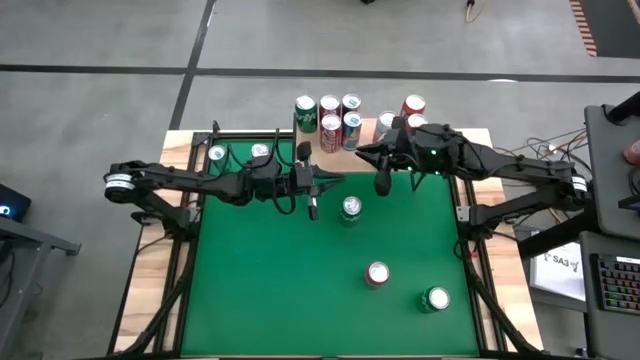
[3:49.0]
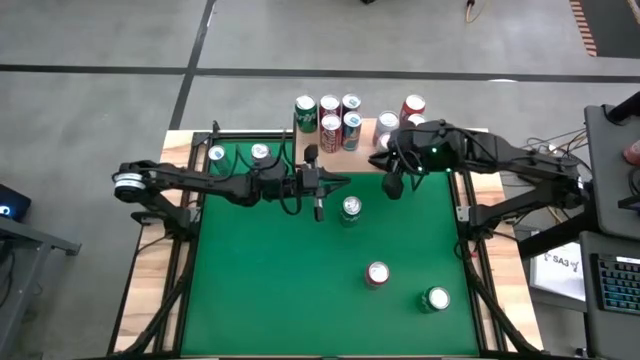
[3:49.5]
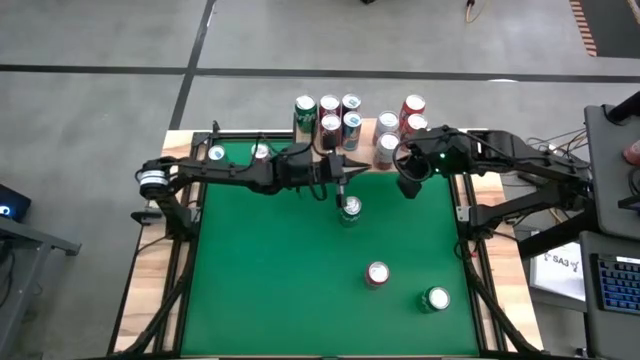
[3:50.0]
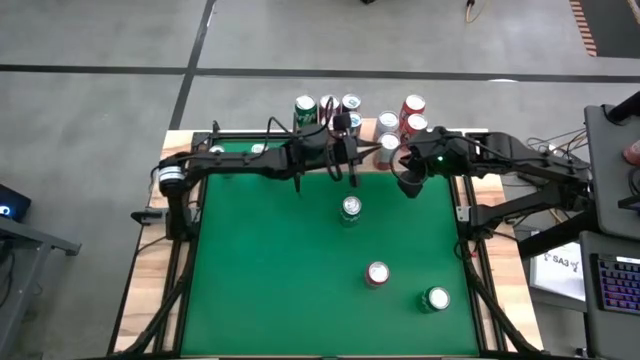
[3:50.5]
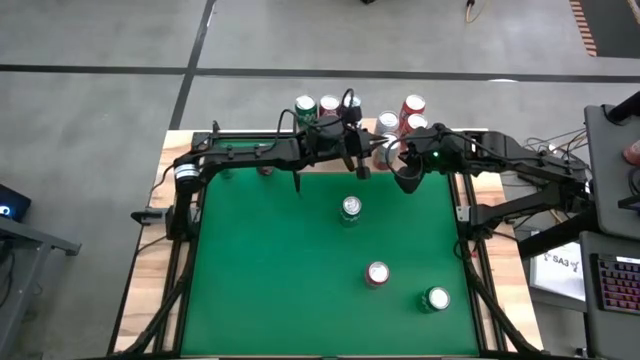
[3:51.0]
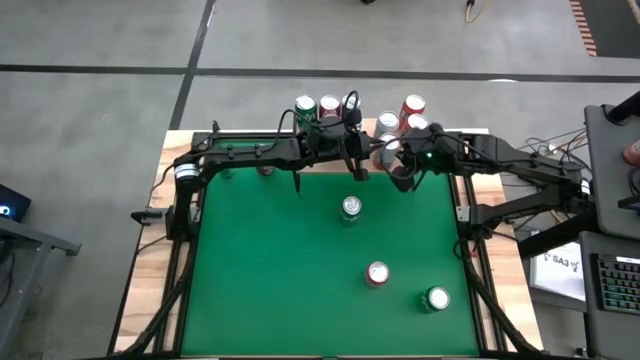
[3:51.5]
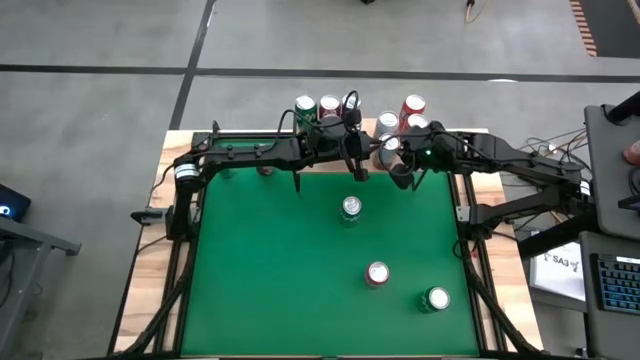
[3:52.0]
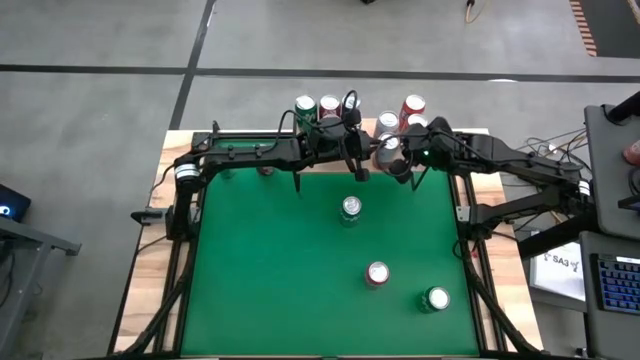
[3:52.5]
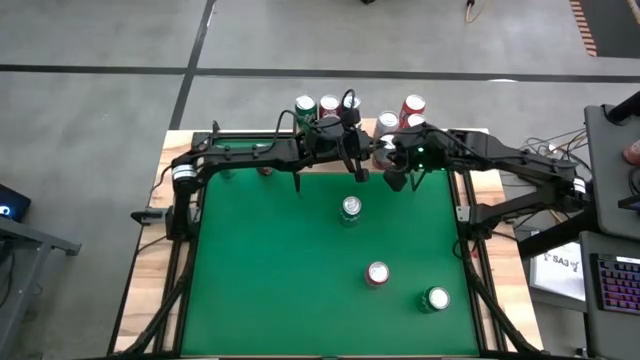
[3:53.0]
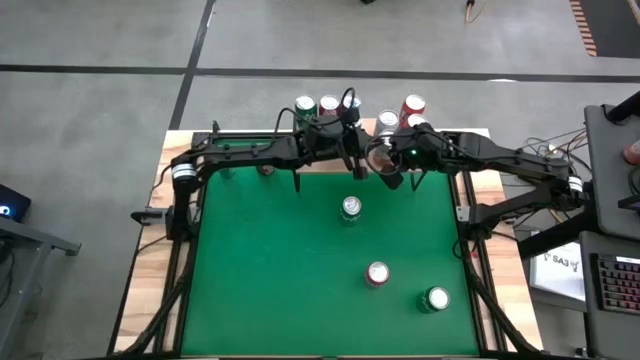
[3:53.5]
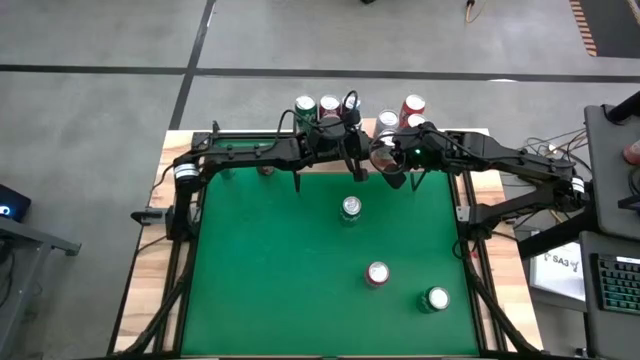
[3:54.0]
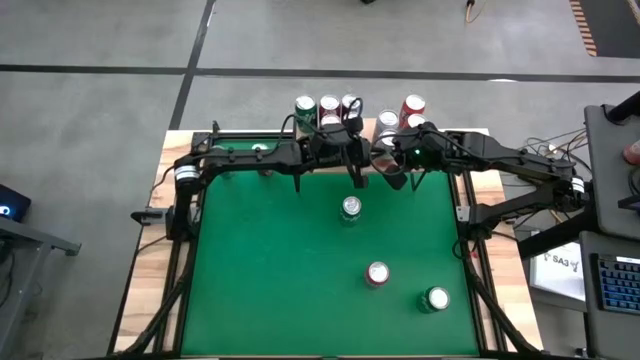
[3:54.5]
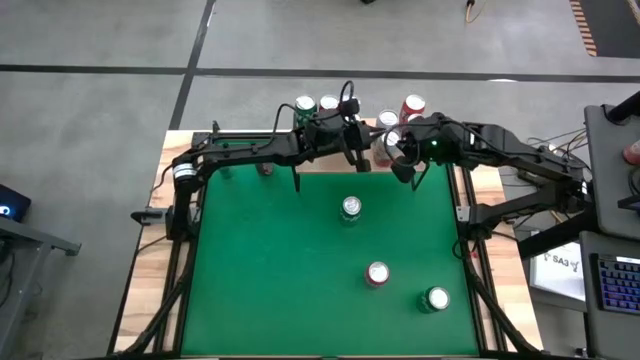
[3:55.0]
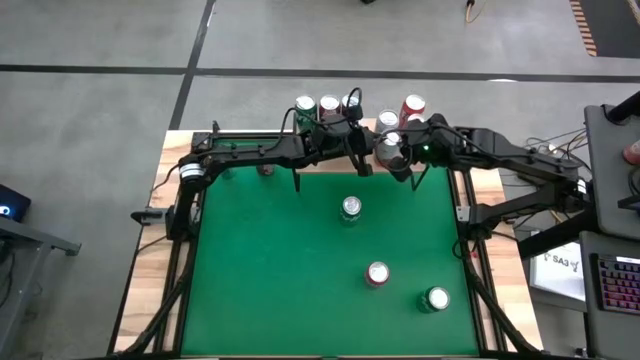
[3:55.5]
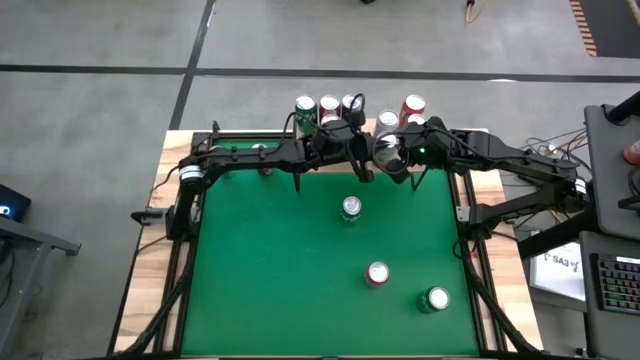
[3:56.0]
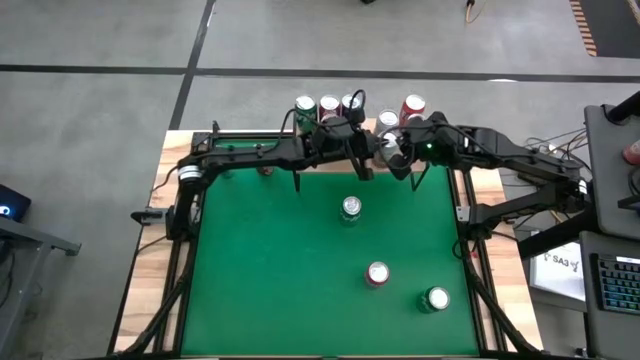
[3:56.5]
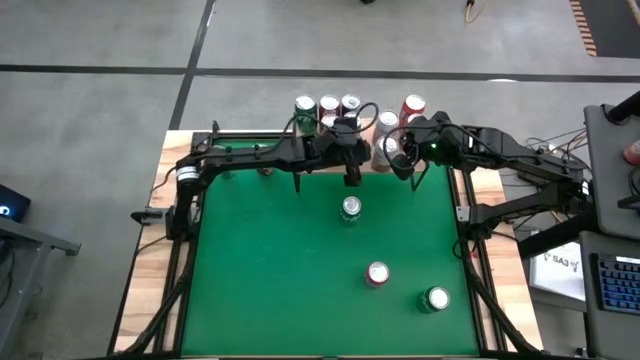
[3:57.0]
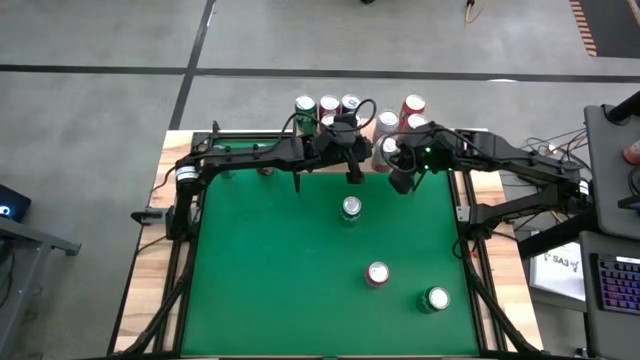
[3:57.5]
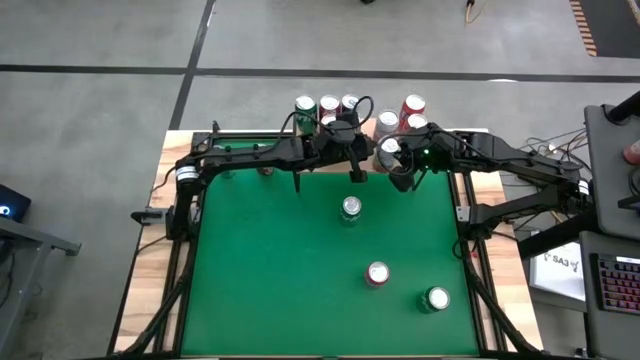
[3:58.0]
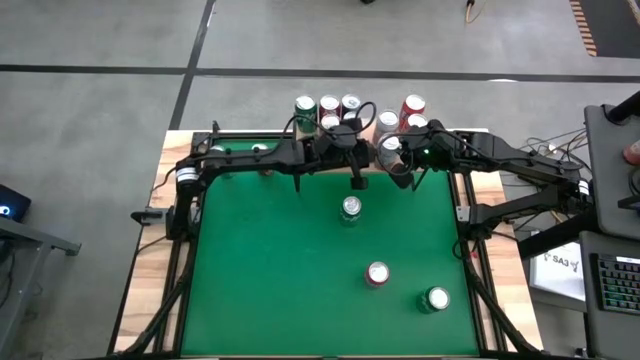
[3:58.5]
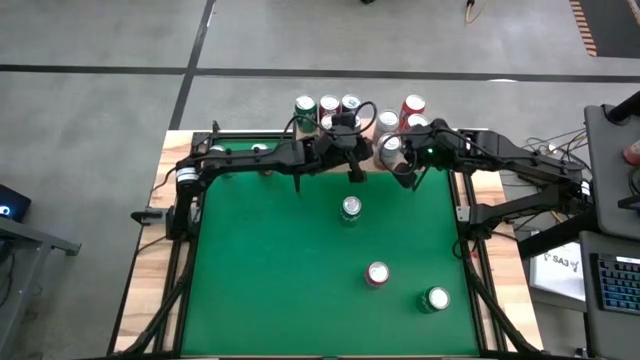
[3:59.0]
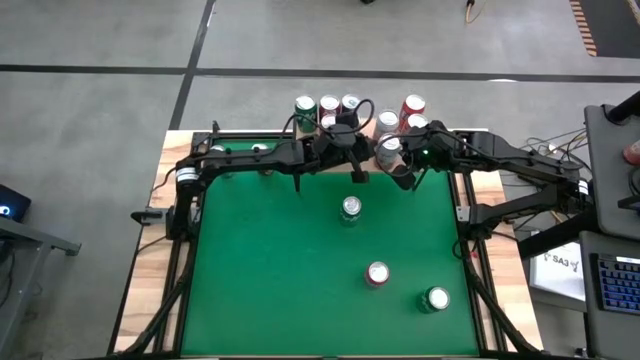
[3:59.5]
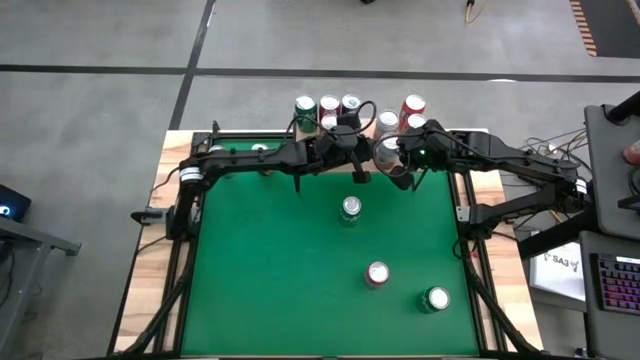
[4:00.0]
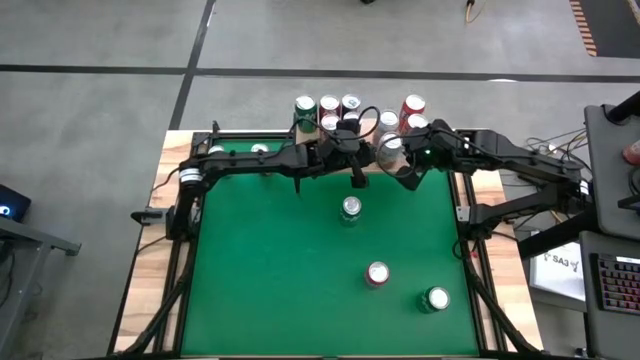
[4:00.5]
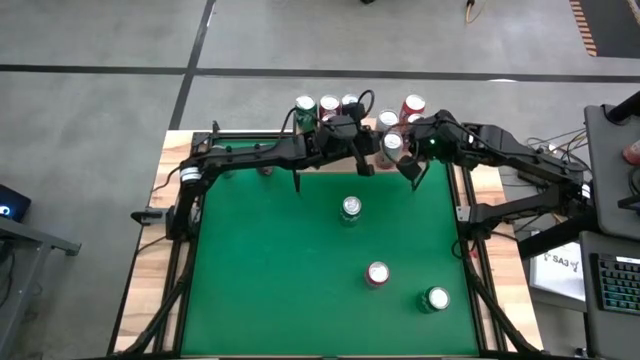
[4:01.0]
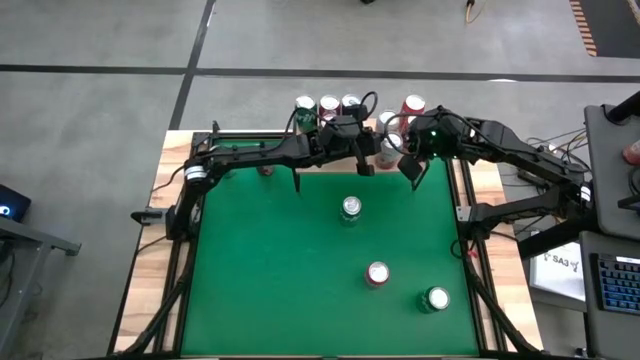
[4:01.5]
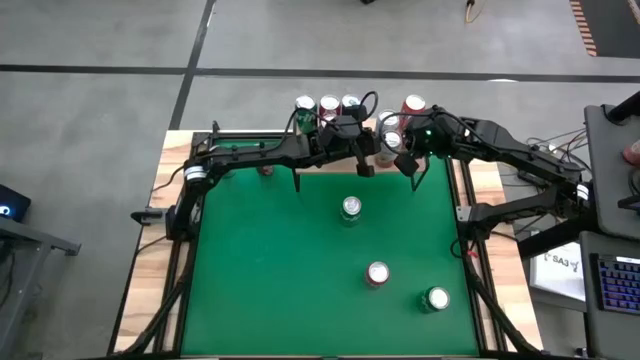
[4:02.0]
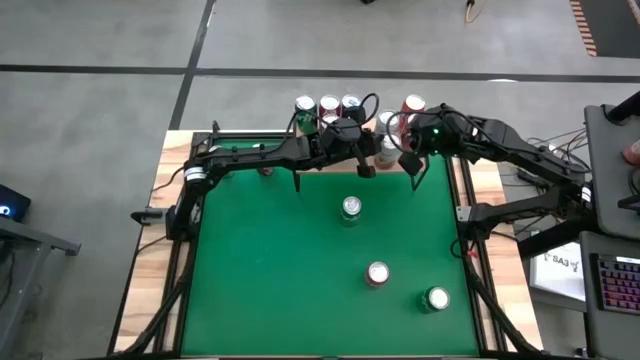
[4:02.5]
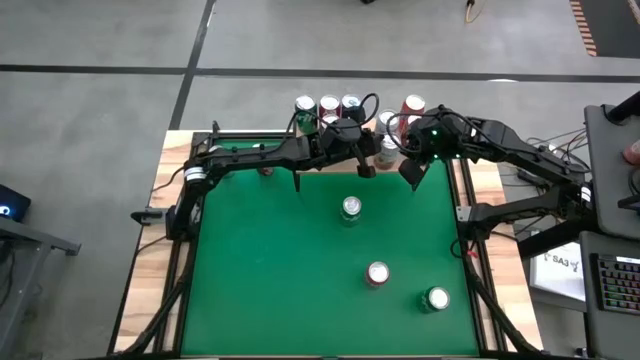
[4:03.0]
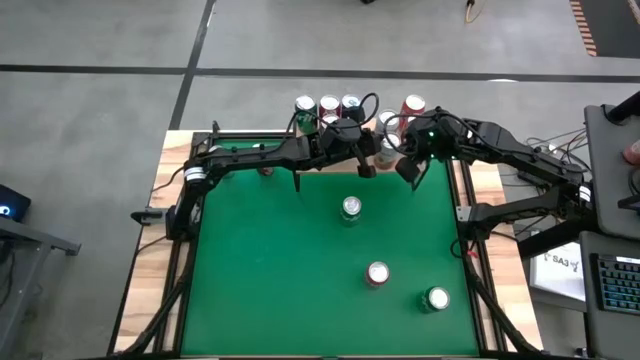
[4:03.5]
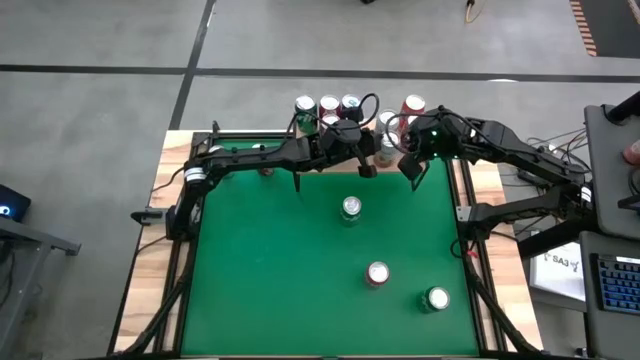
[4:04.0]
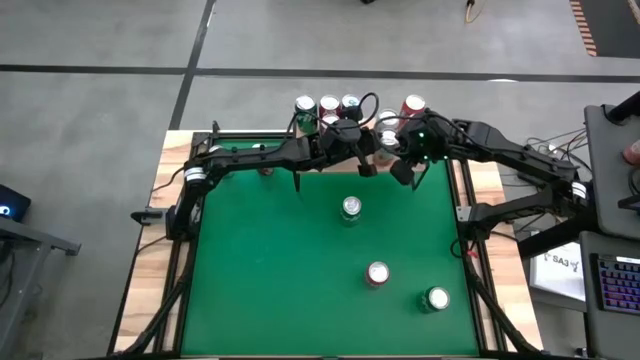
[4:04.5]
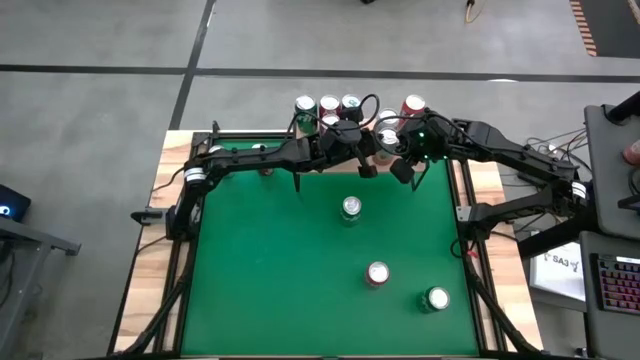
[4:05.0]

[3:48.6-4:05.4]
Task: Place canned beverage on shelf
Put the pink white soda can aligned with the red white soda can on the shelf

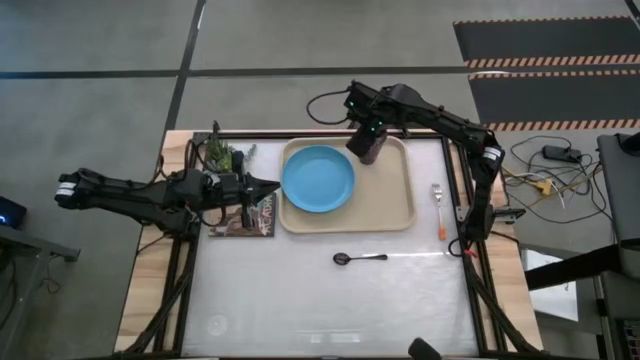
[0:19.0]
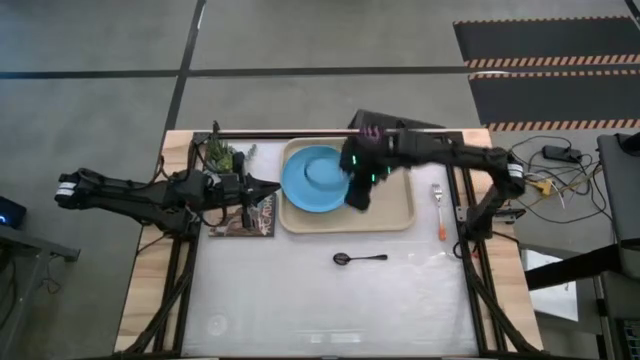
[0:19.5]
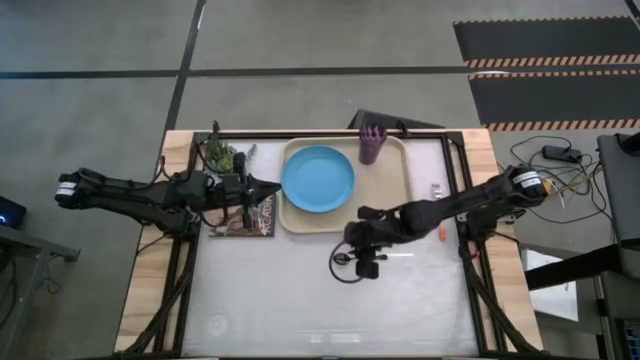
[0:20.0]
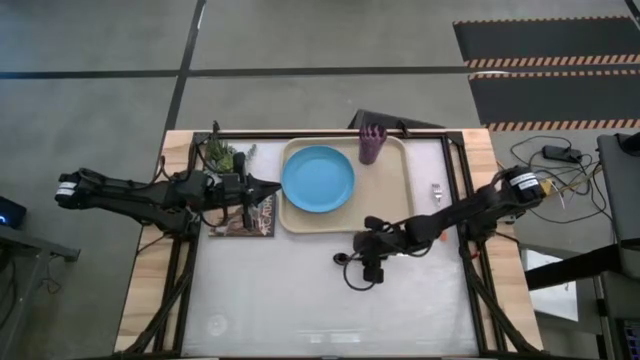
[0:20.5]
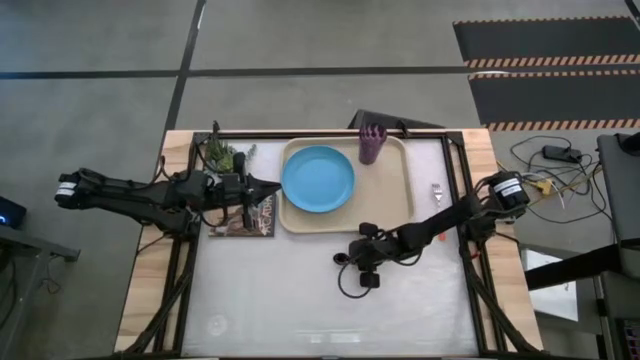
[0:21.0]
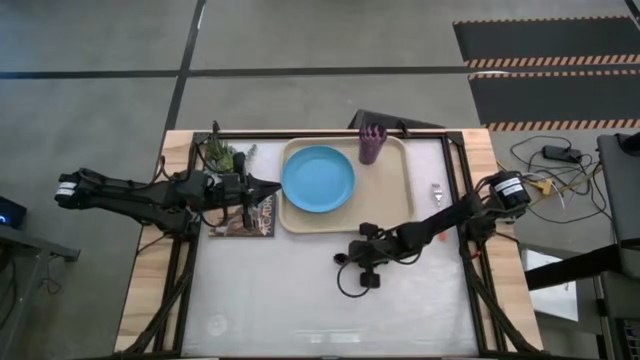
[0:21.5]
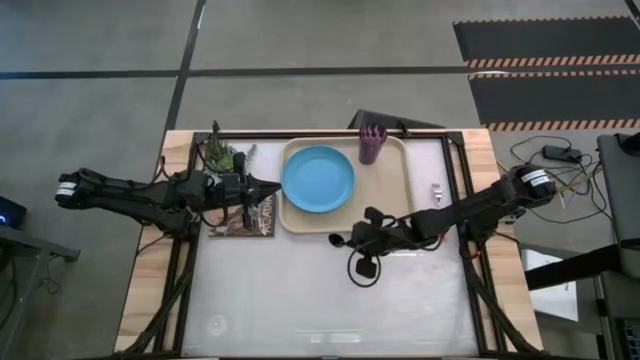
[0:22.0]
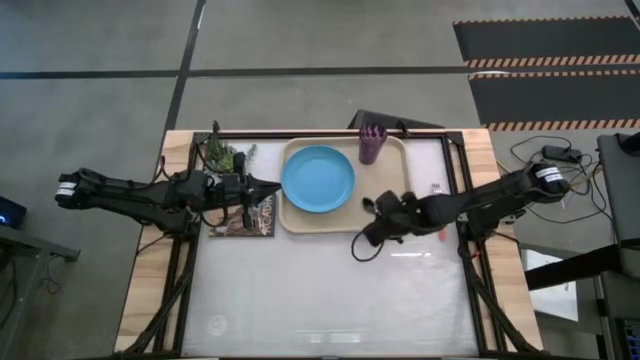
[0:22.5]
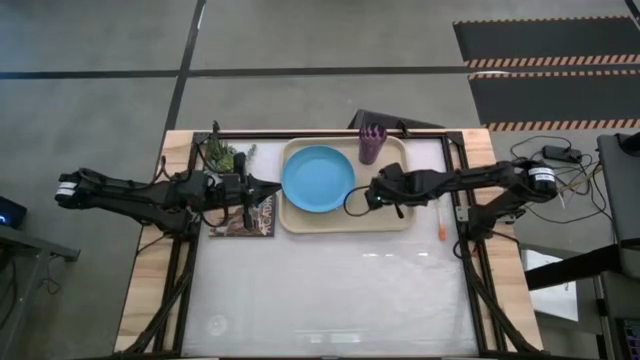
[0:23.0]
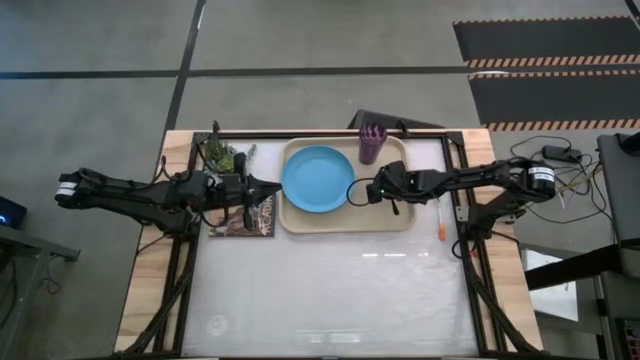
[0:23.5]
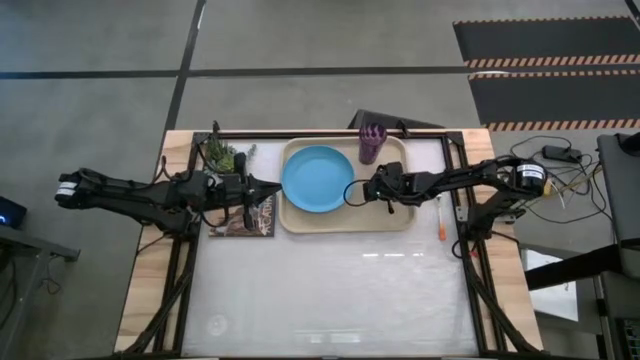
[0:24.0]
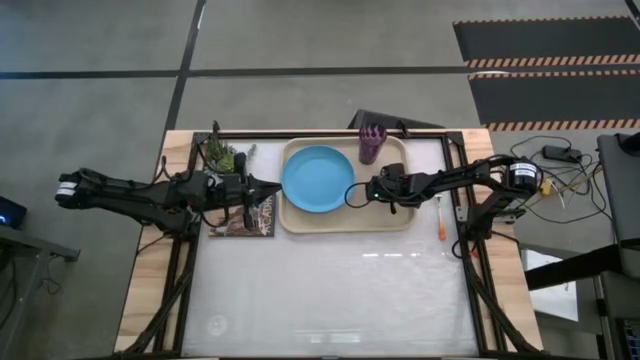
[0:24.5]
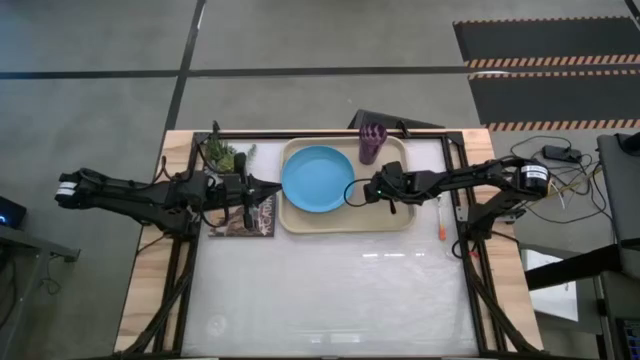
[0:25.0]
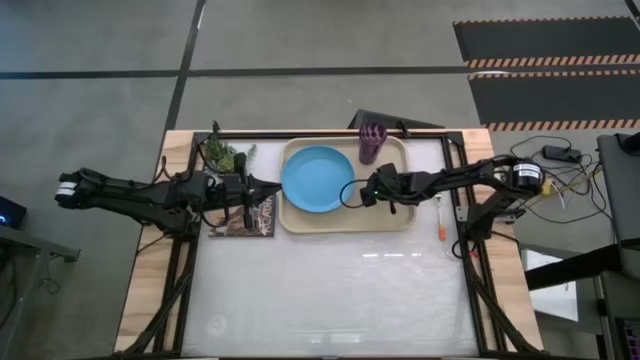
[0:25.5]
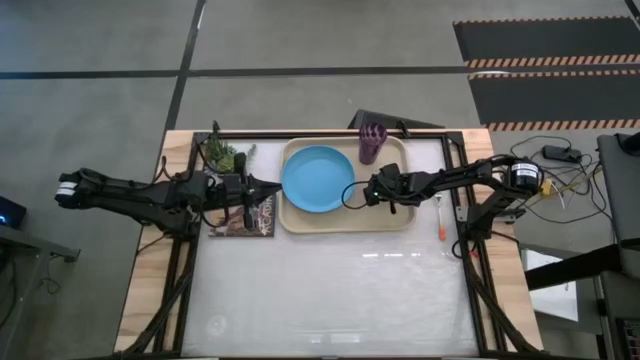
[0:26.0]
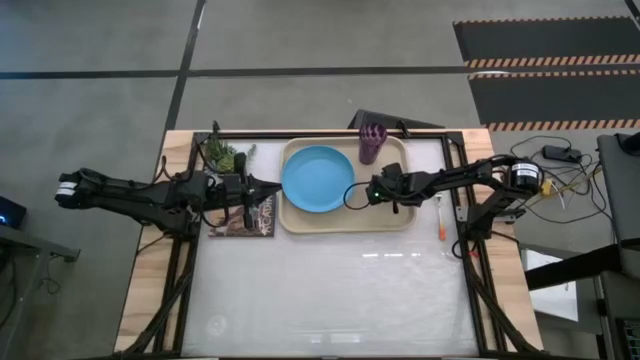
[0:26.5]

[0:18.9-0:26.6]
Task: Pick and place plate/cup/fork/spoon on tray
Put the black spoon on the right of the white tray
